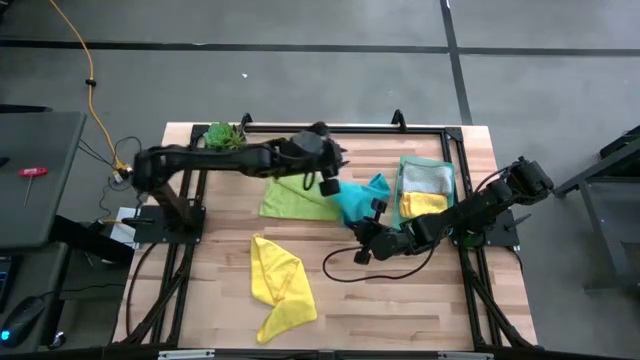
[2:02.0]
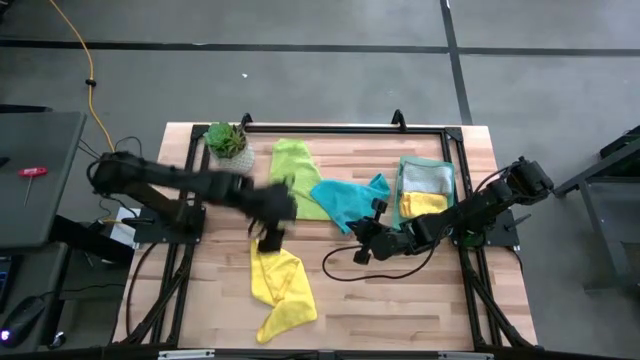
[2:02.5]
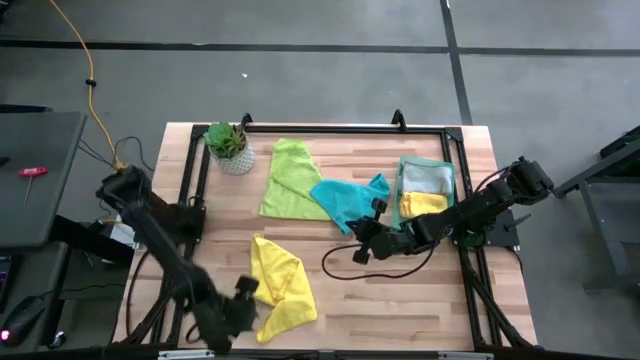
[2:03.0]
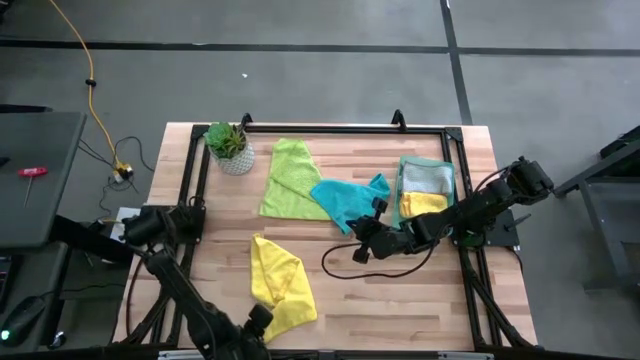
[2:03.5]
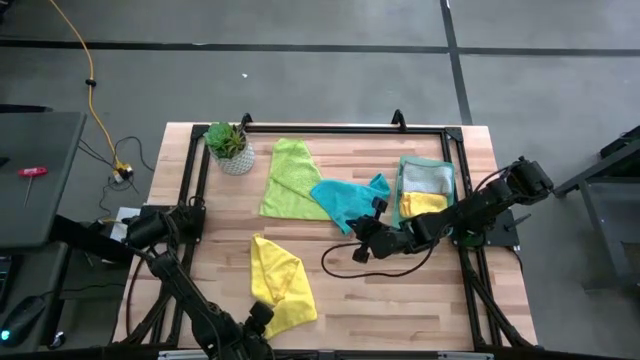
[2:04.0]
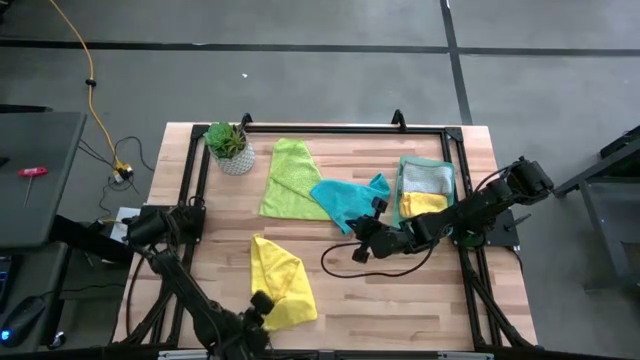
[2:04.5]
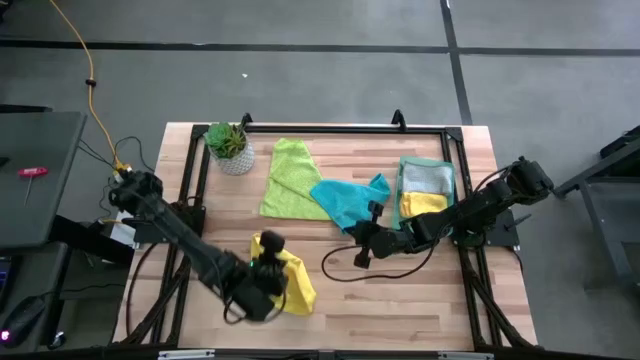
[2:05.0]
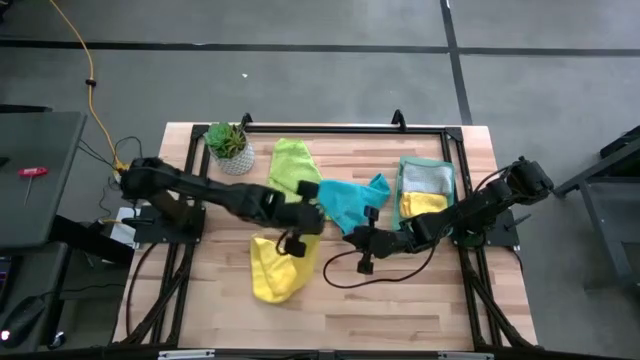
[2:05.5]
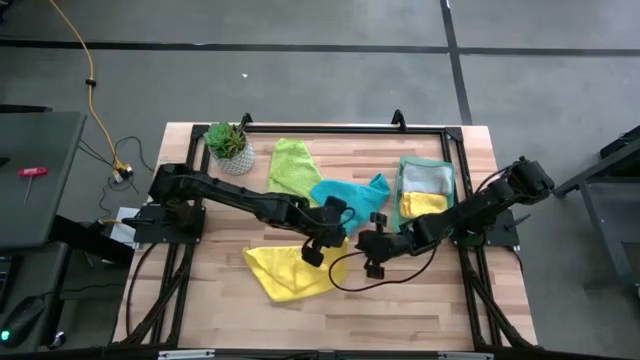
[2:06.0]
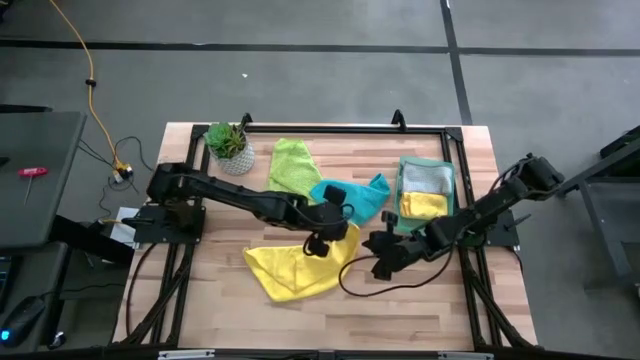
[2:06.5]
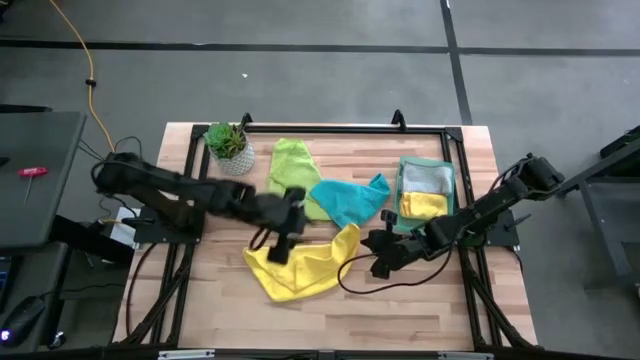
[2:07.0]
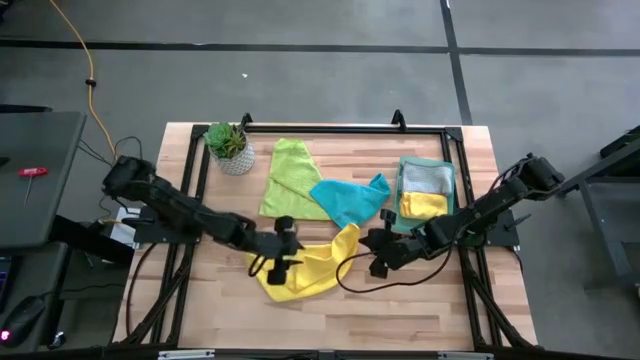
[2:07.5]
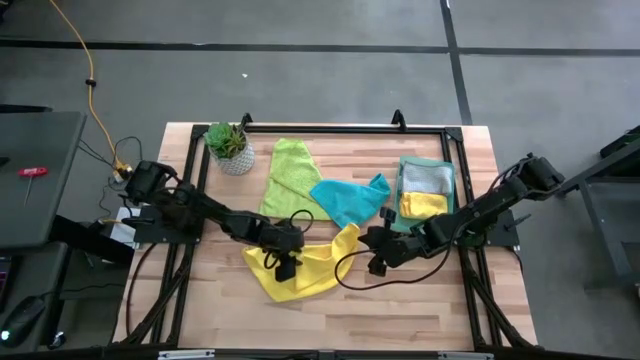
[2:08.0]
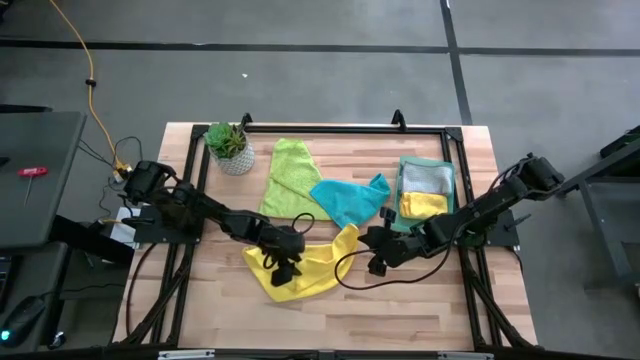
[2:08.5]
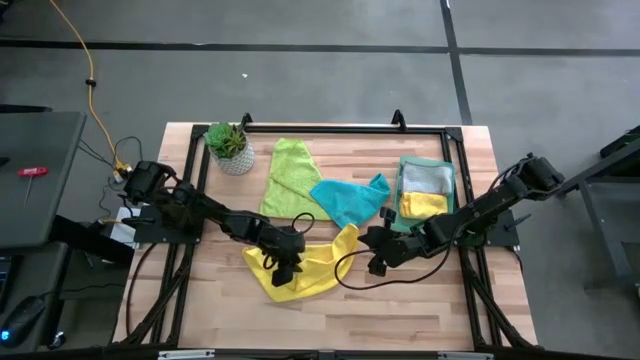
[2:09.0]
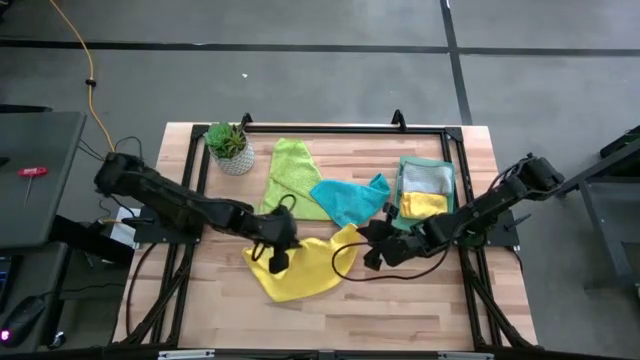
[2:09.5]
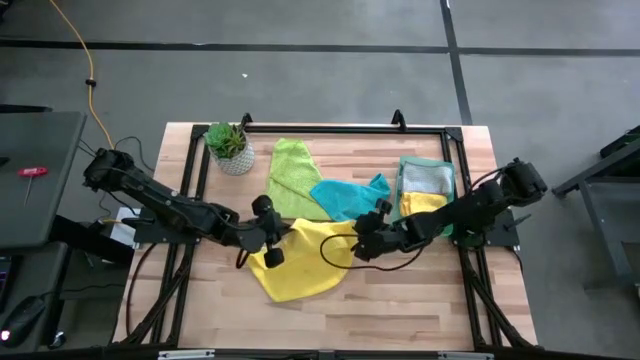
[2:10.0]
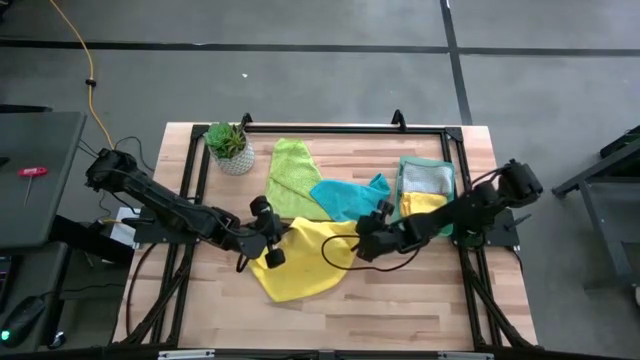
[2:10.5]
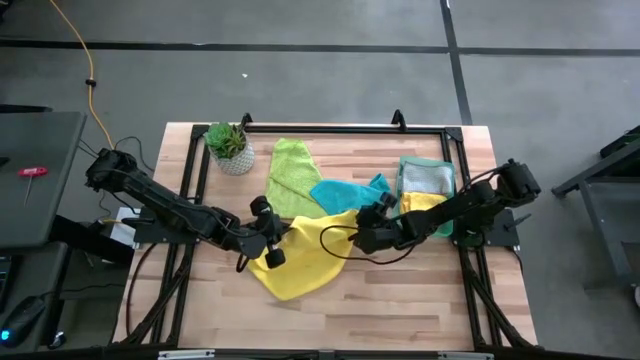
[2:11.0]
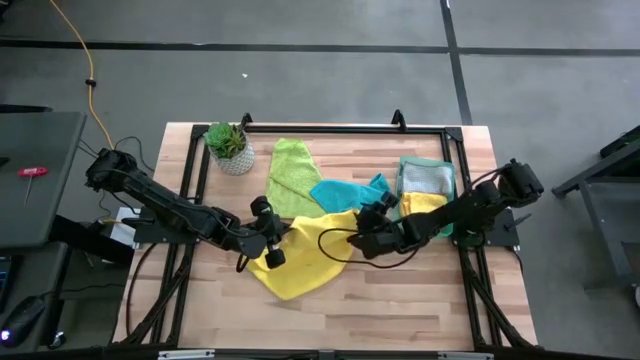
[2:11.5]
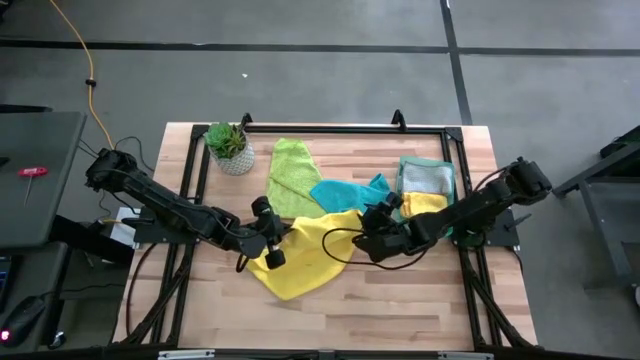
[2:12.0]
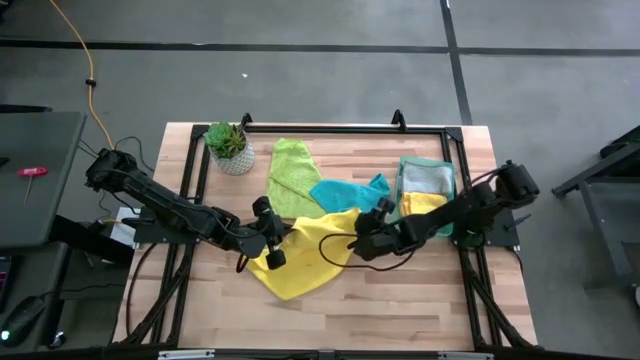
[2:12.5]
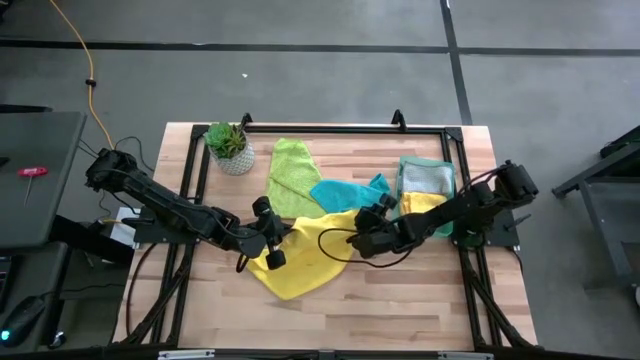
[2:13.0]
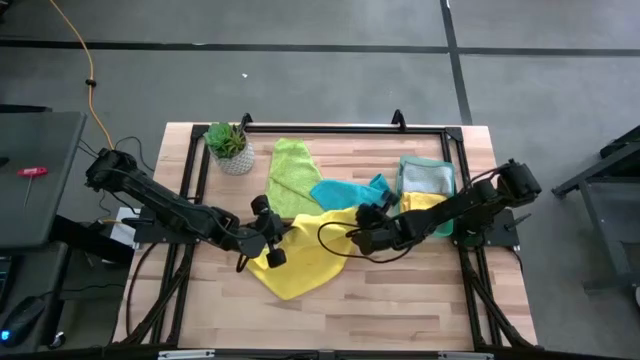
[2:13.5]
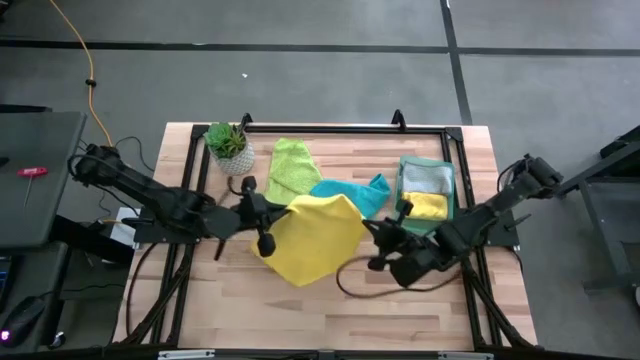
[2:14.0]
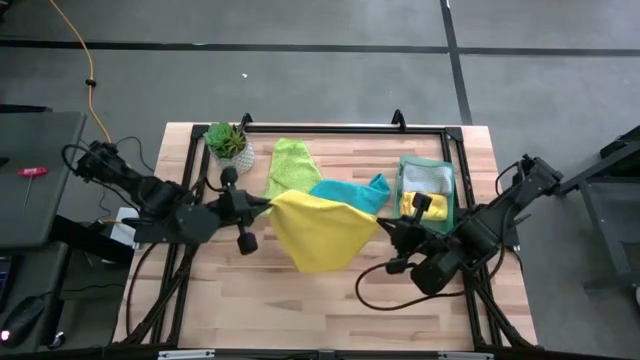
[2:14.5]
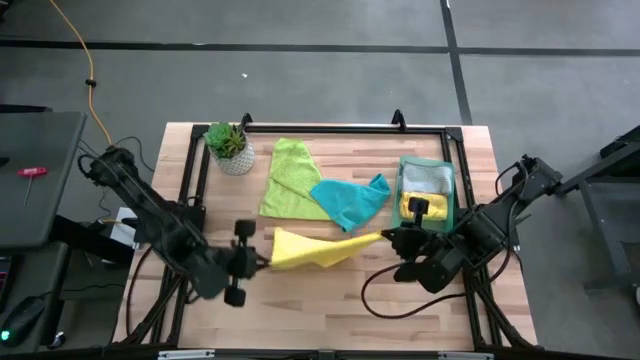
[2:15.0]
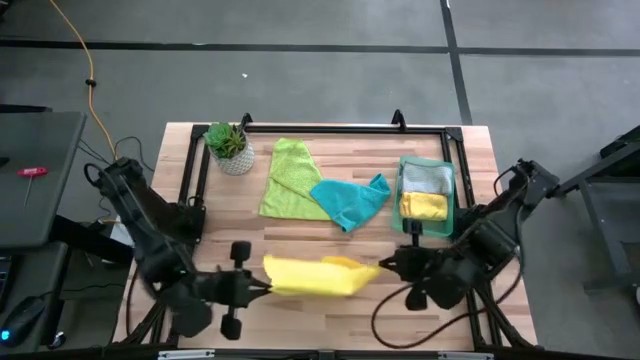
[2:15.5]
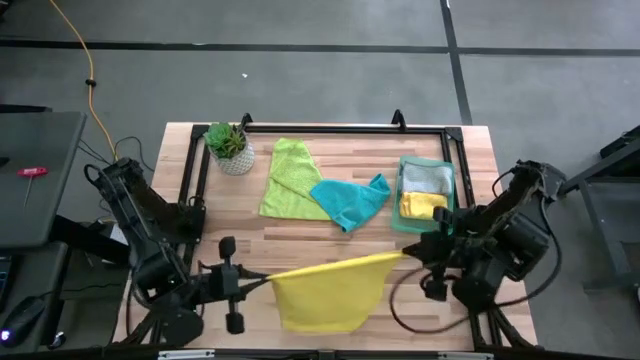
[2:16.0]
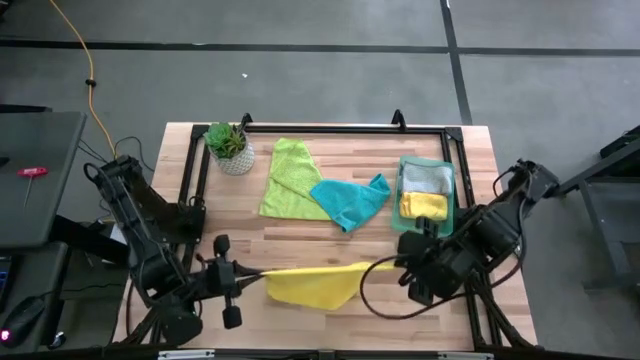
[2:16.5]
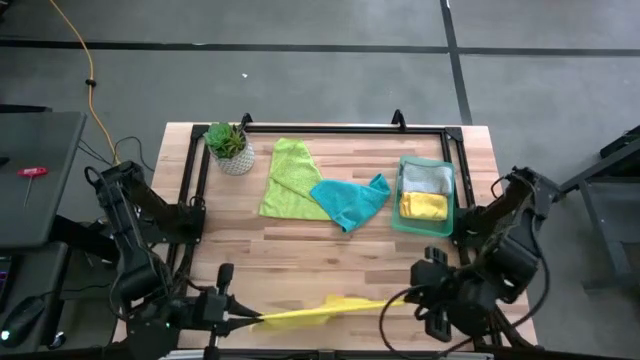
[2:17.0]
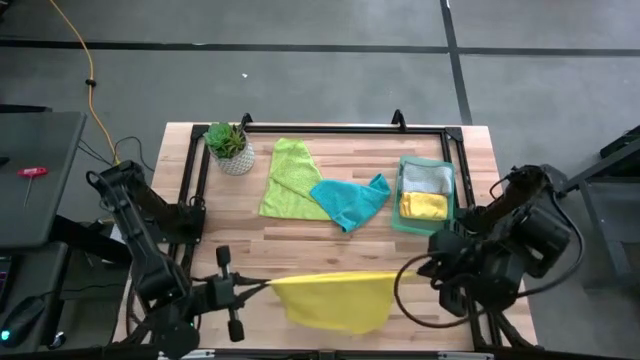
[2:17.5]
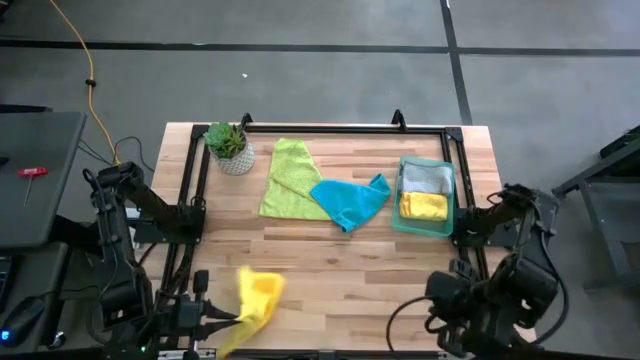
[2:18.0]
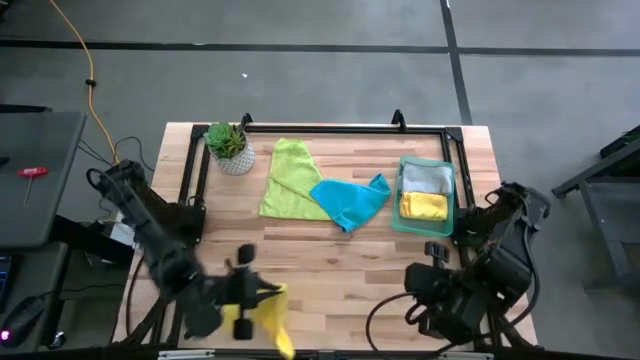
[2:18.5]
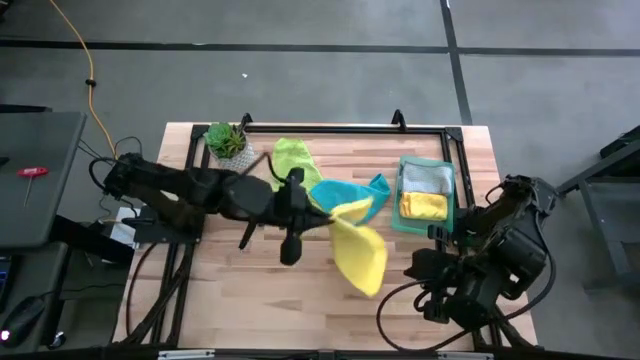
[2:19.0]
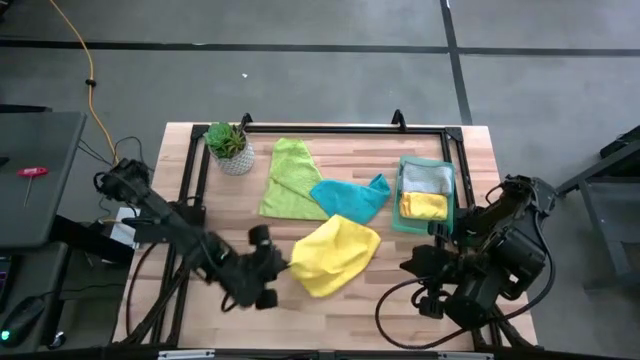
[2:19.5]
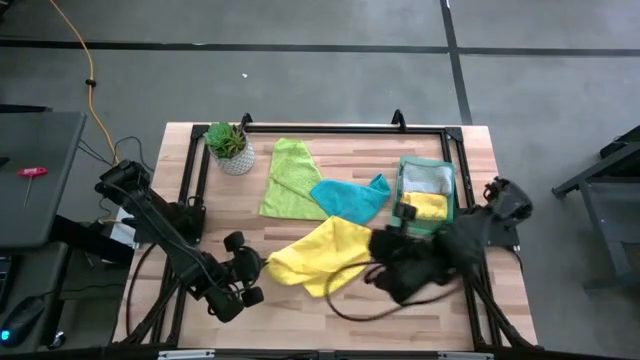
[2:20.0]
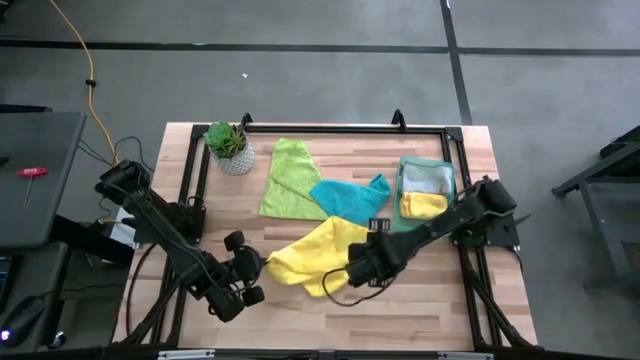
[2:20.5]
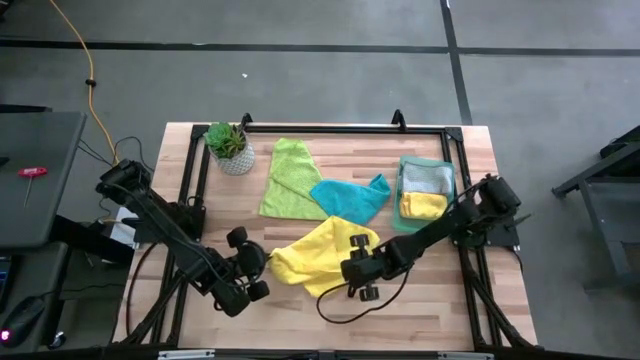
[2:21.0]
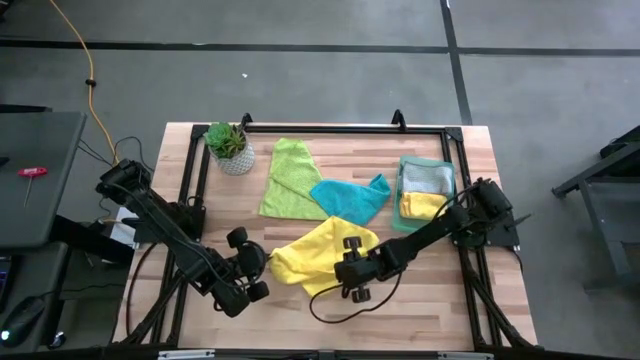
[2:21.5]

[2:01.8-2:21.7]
Task: Fold microfiber towels
Fold the yellow microfiber cloth
